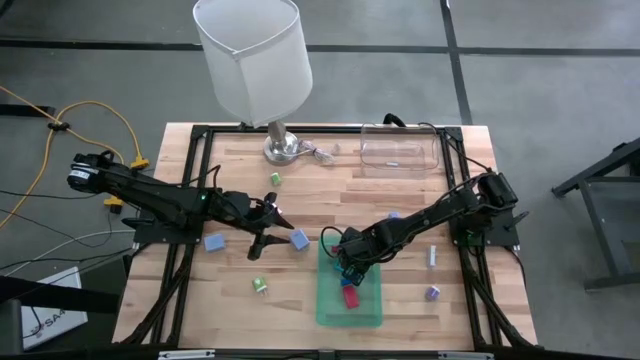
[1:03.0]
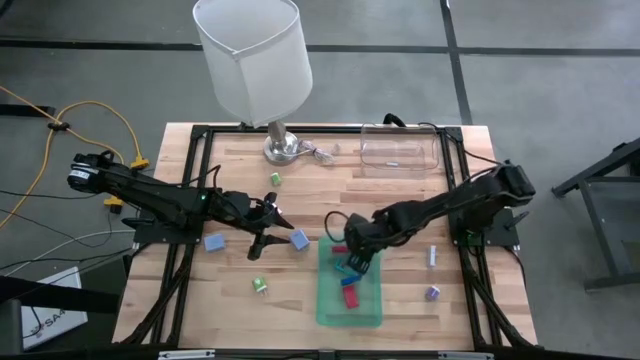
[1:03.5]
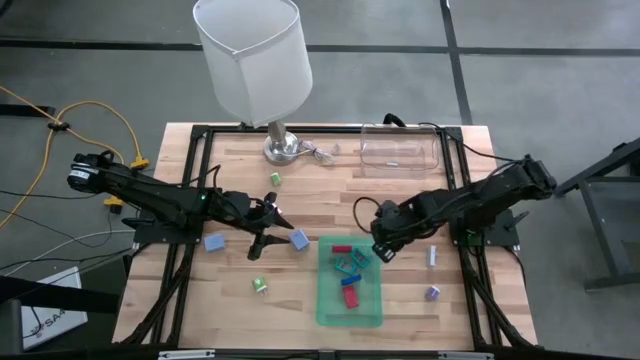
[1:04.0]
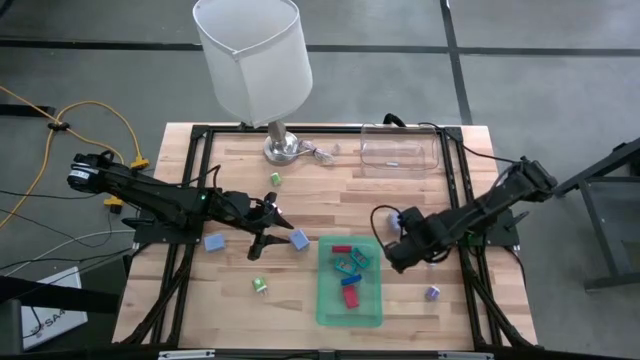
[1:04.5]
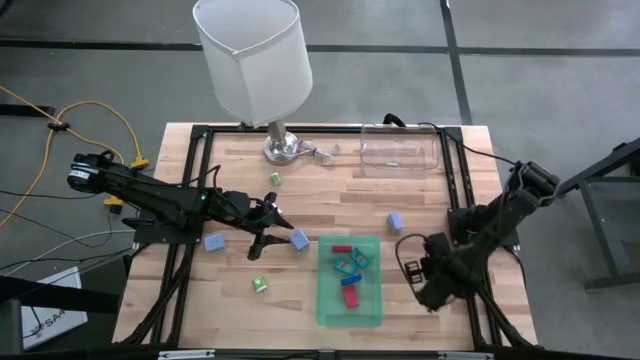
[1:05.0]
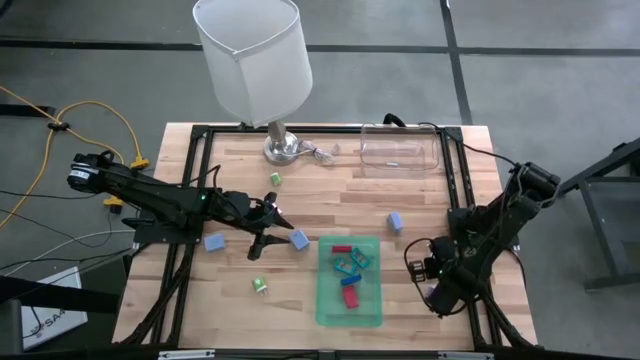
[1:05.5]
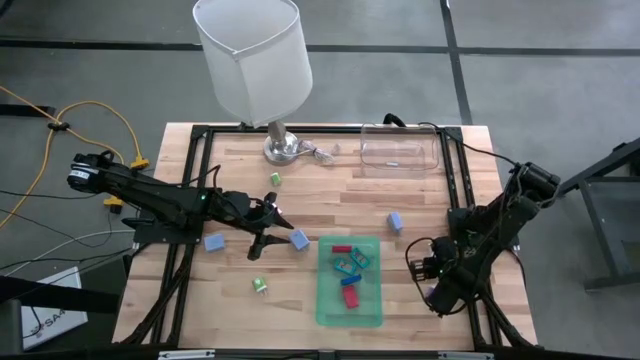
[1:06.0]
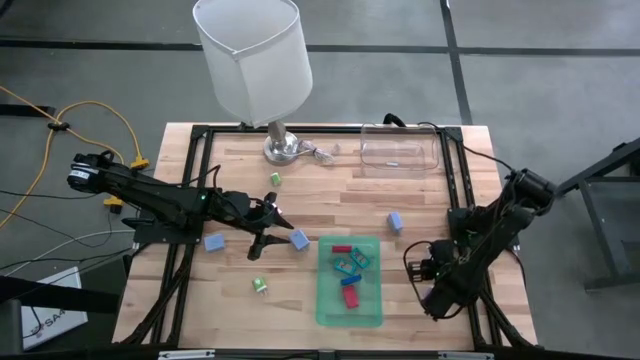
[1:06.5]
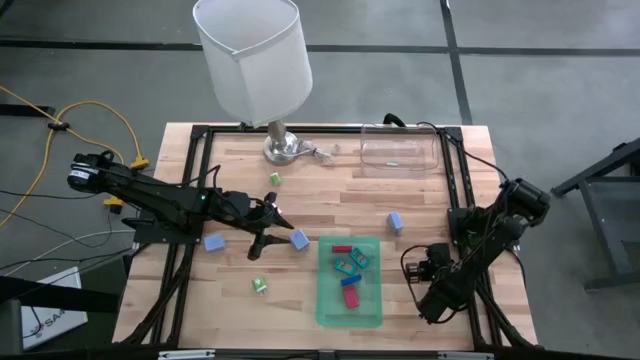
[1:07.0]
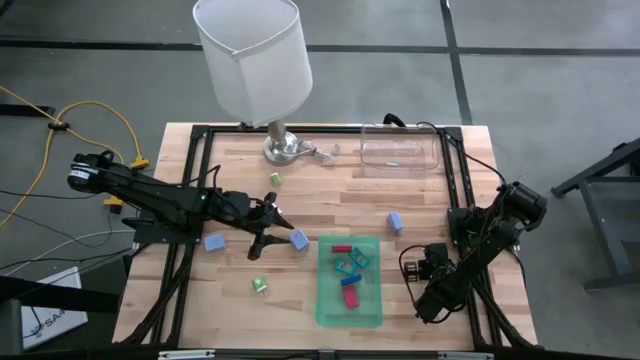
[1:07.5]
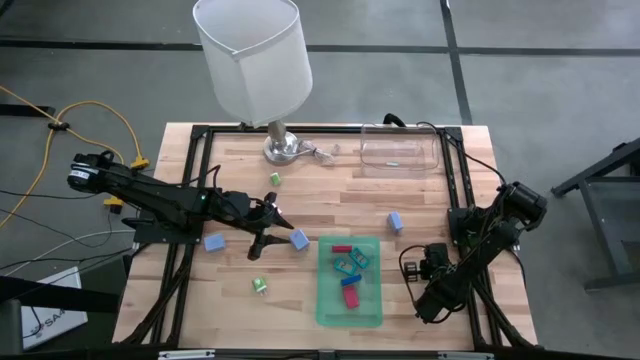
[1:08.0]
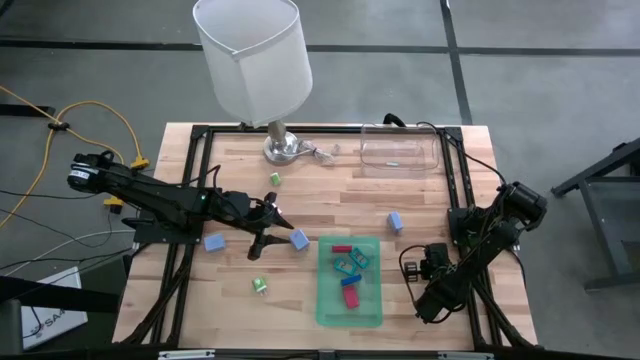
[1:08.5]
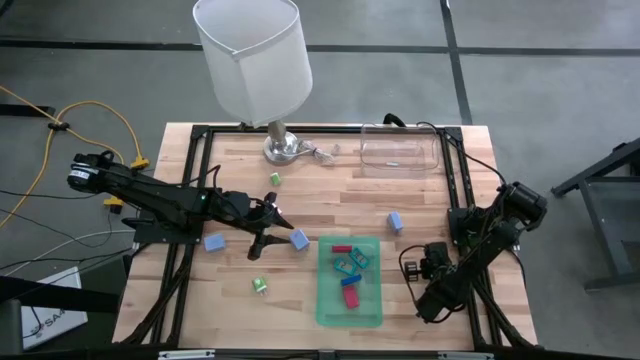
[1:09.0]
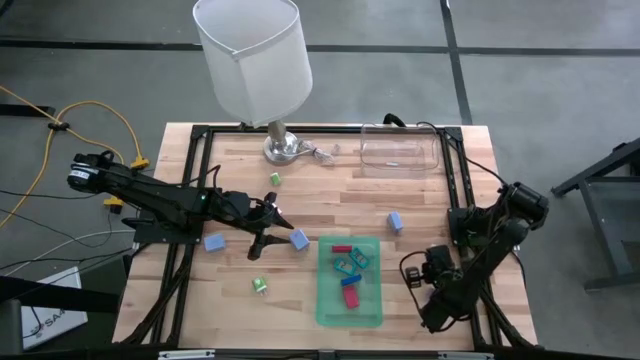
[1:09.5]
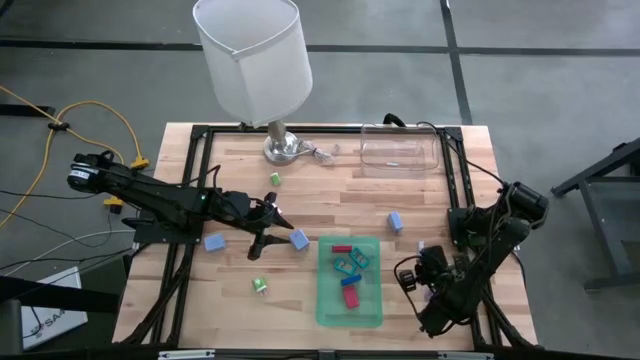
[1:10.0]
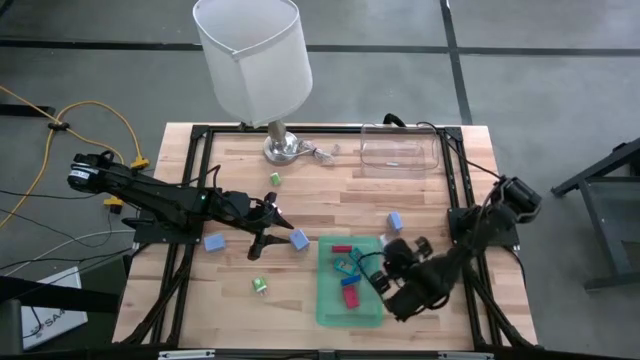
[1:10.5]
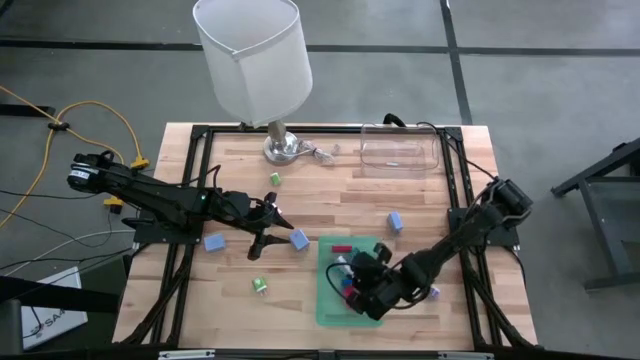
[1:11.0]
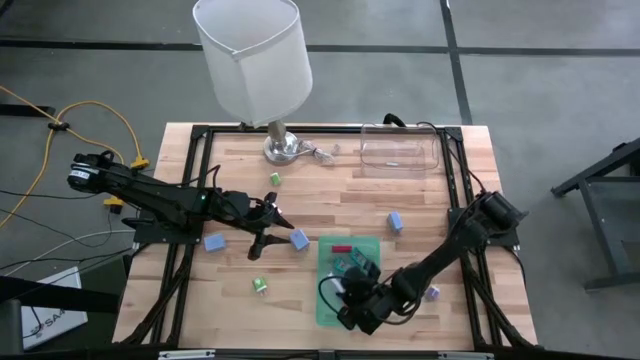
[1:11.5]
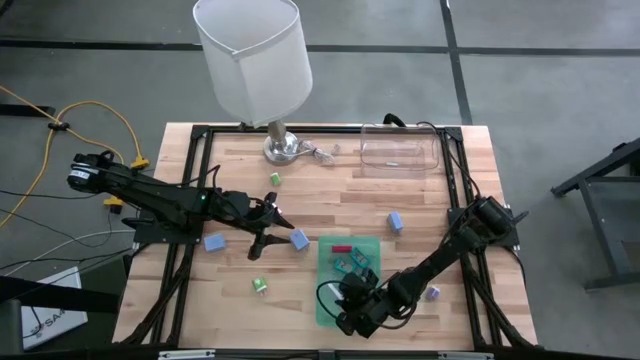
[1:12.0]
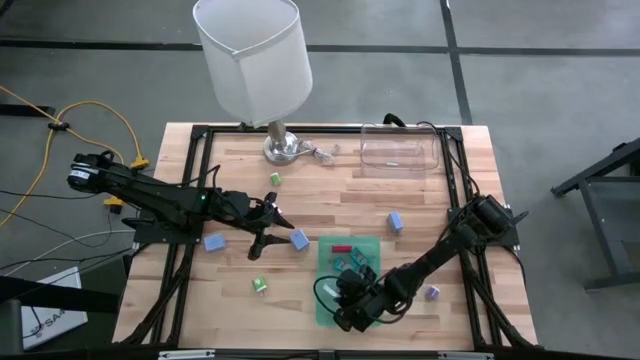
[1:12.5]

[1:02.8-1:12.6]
Task: Pick & Place Office items
Put the white digital clock into the green bin

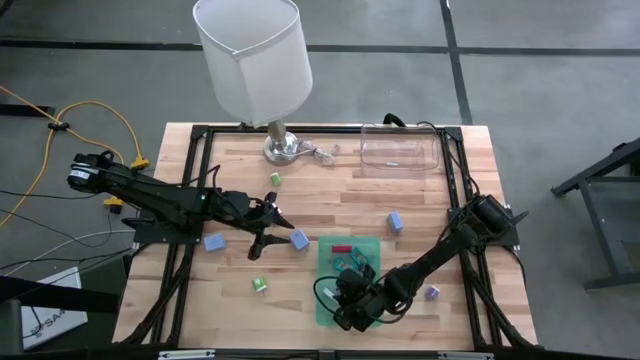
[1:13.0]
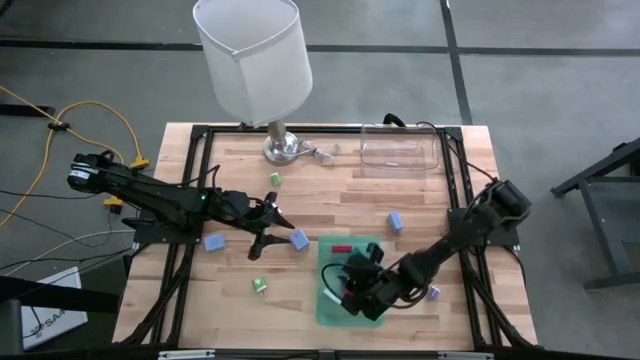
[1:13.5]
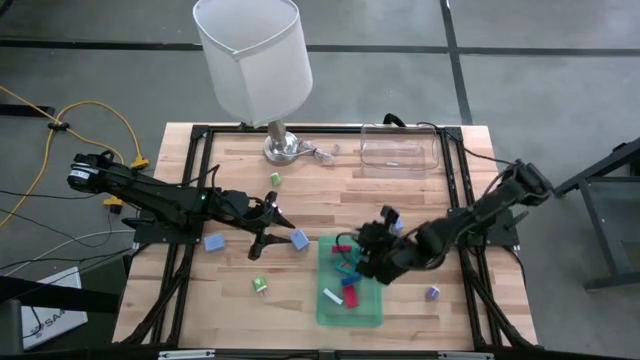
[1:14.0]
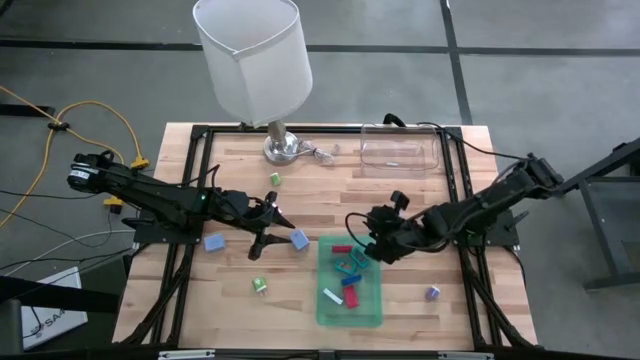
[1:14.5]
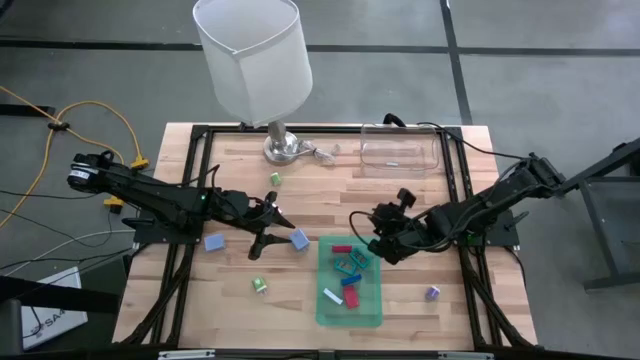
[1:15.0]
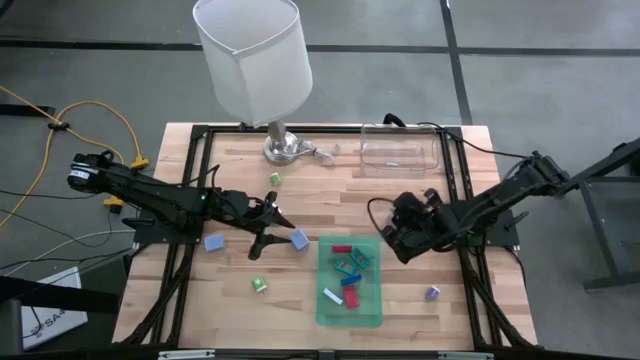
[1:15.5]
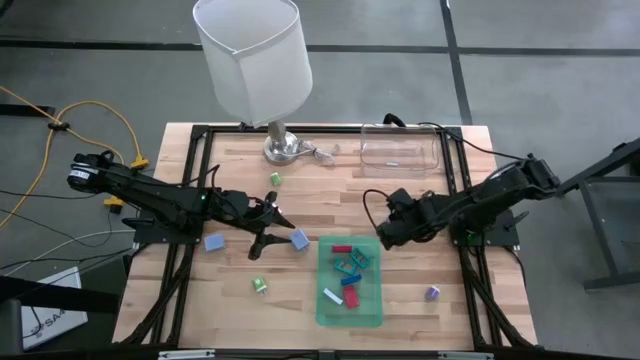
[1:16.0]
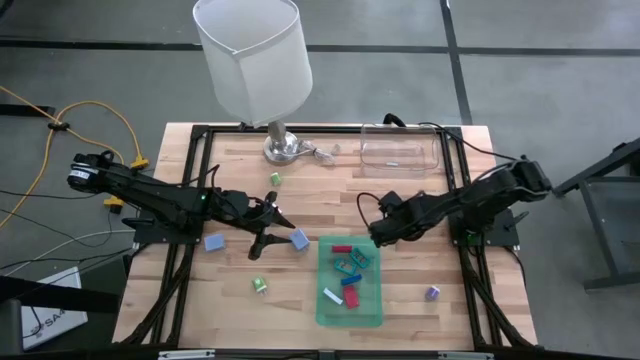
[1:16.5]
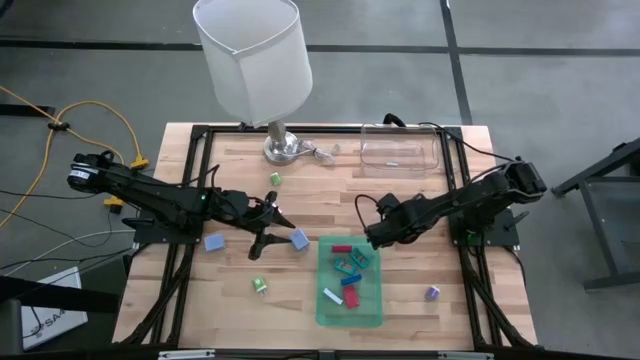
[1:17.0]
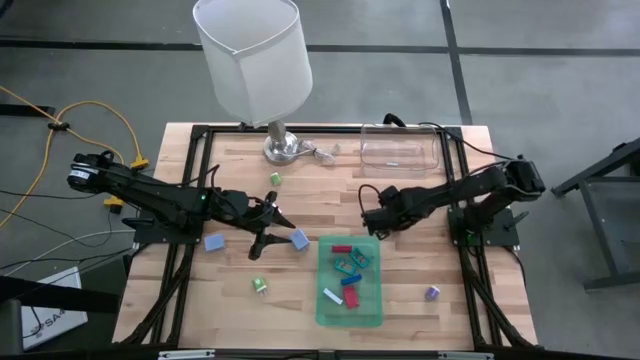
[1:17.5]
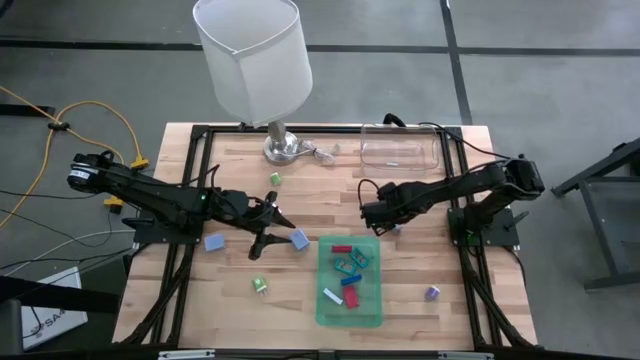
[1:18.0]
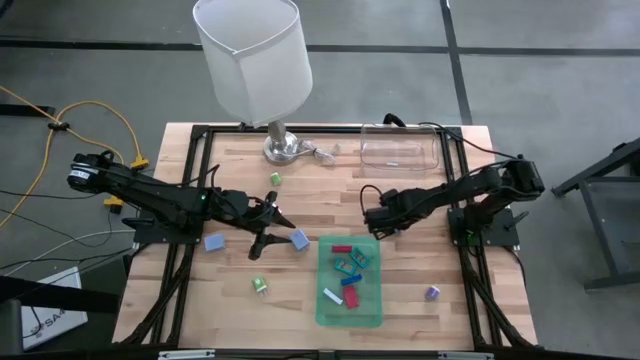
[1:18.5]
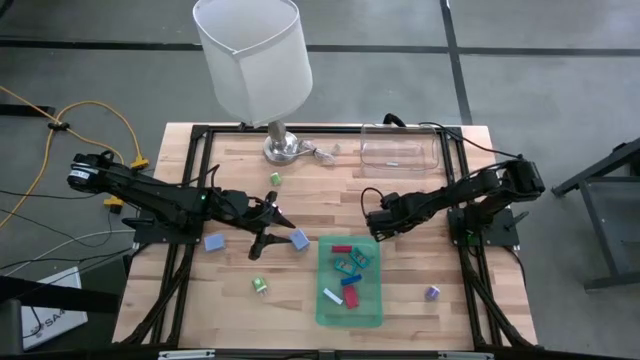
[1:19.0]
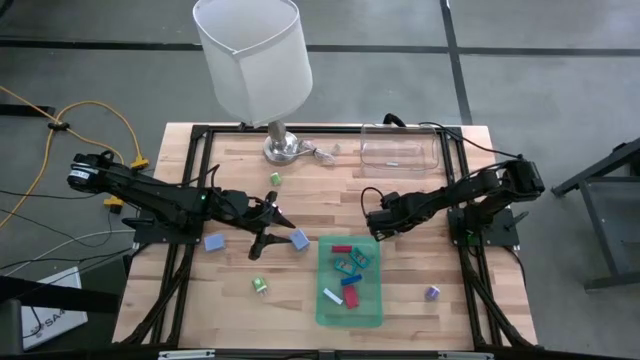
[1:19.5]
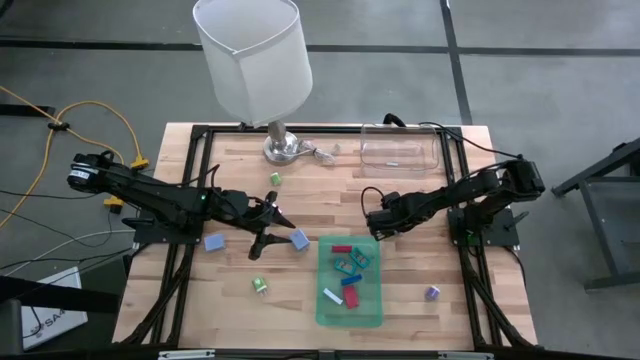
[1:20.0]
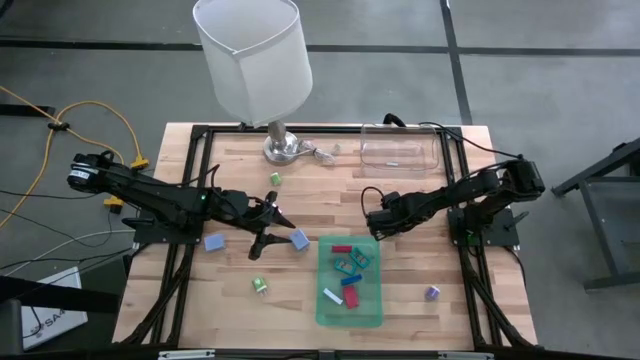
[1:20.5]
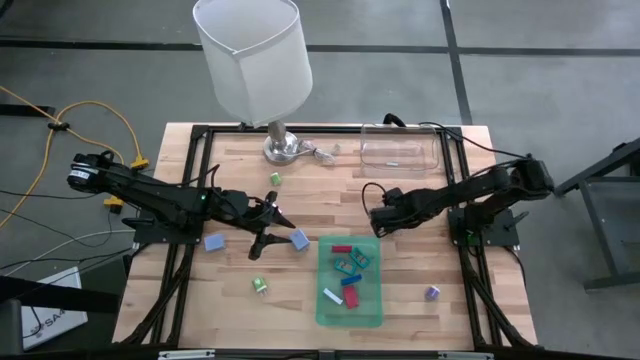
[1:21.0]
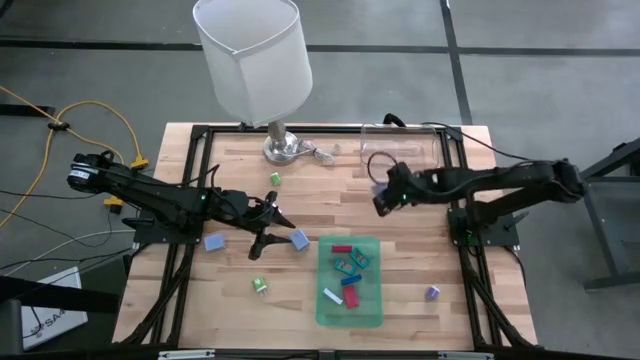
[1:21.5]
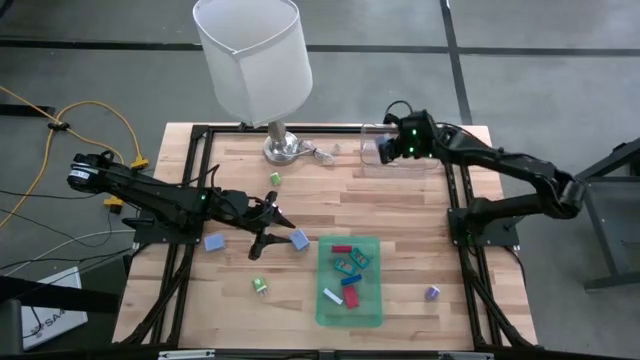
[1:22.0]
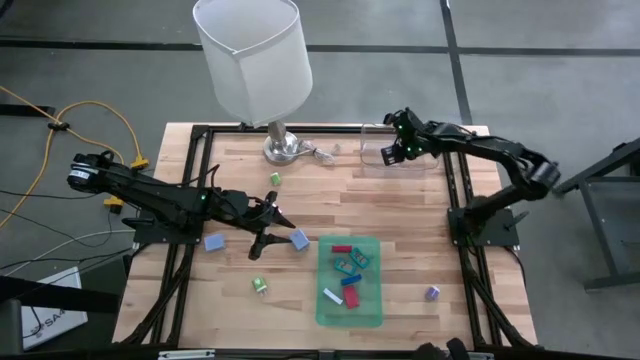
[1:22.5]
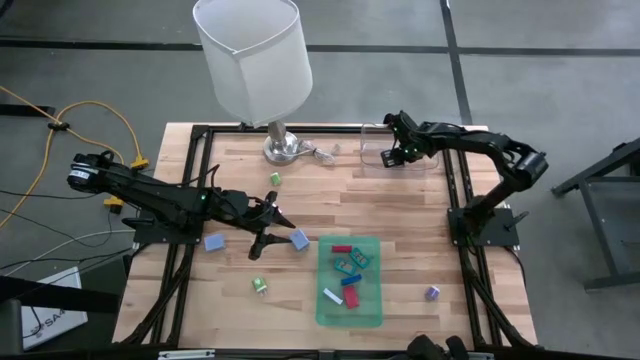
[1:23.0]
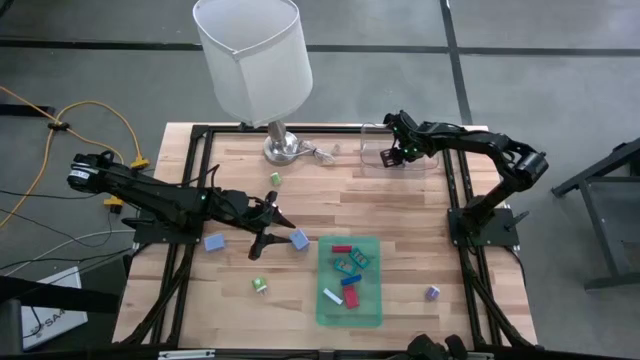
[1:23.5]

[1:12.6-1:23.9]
Put the right purple charger adapter into the transparent bin
